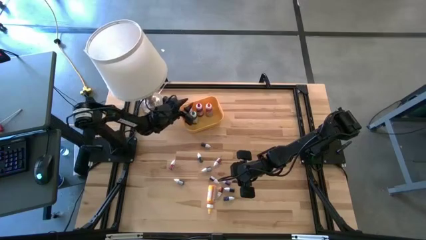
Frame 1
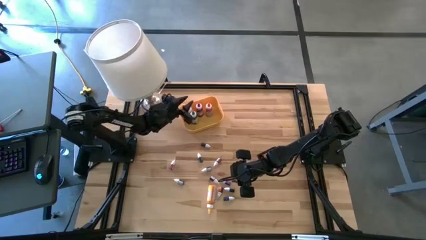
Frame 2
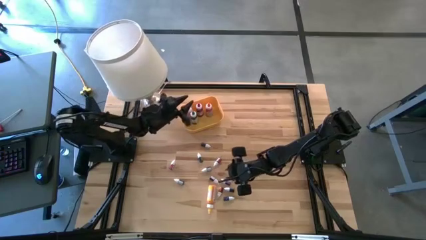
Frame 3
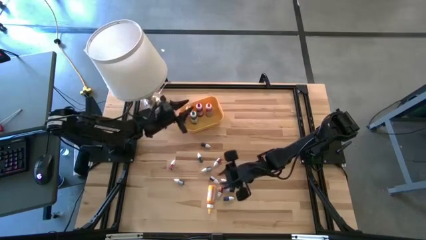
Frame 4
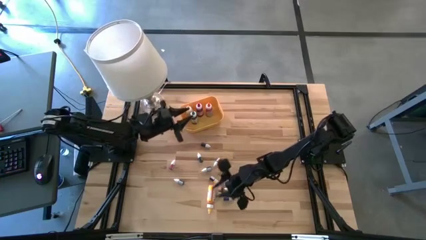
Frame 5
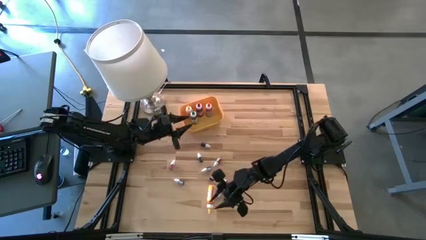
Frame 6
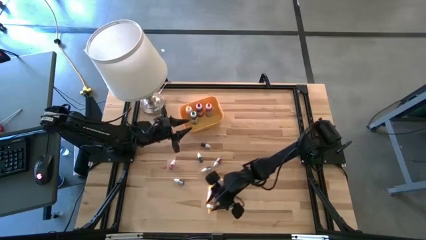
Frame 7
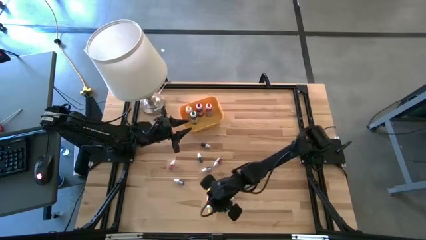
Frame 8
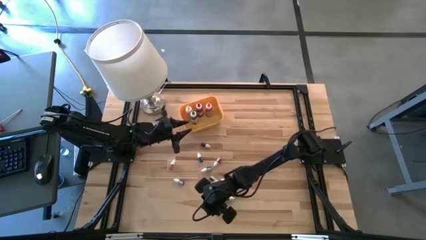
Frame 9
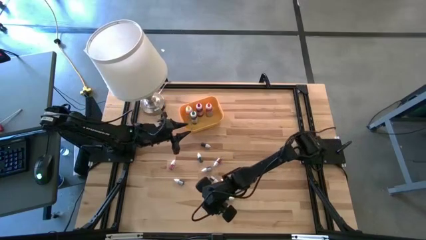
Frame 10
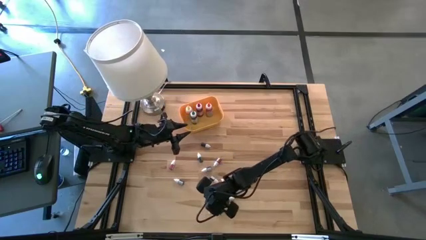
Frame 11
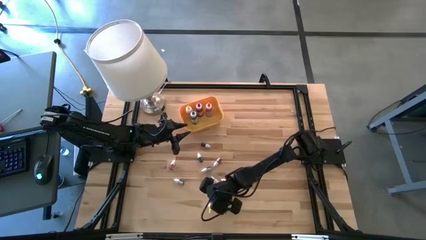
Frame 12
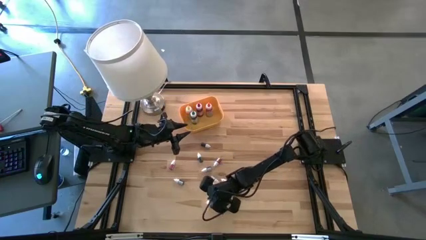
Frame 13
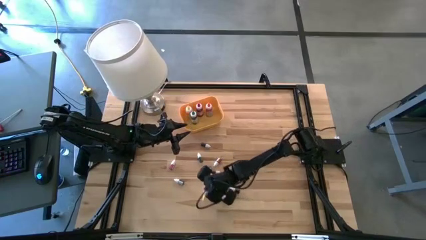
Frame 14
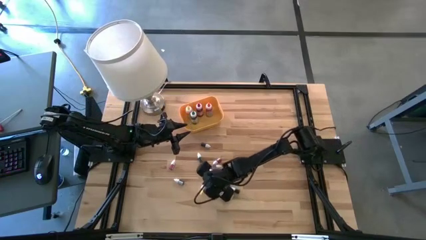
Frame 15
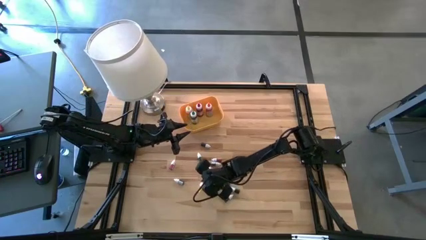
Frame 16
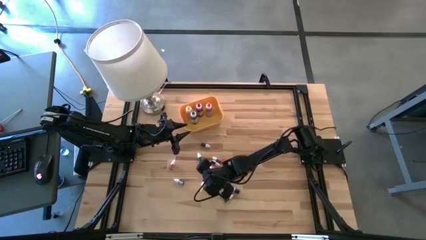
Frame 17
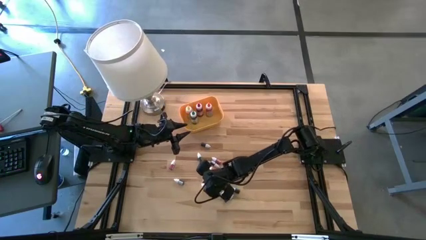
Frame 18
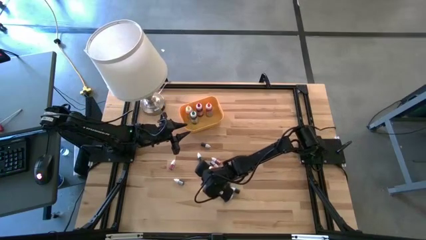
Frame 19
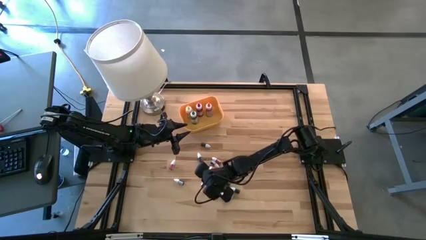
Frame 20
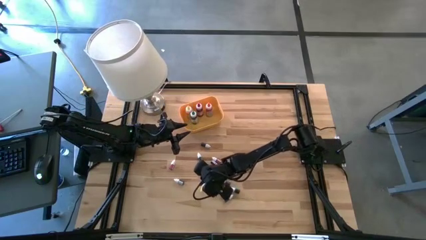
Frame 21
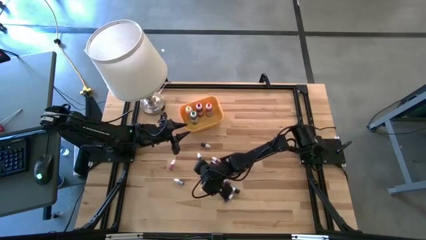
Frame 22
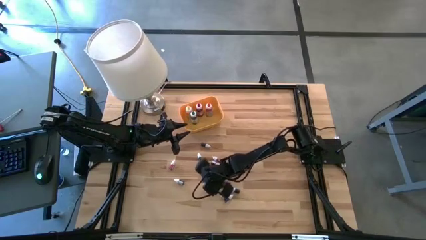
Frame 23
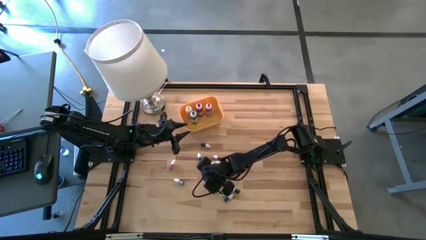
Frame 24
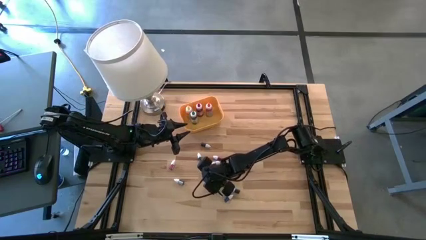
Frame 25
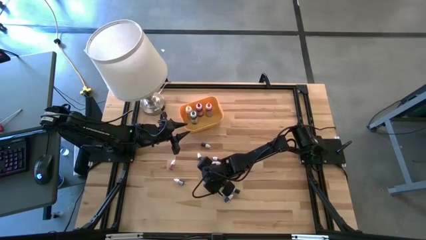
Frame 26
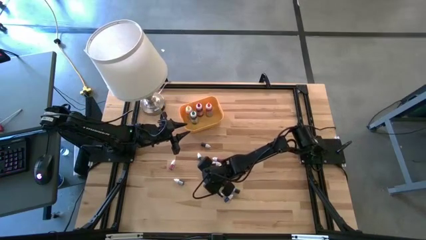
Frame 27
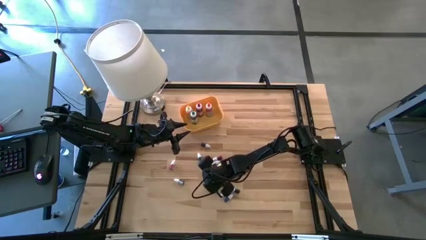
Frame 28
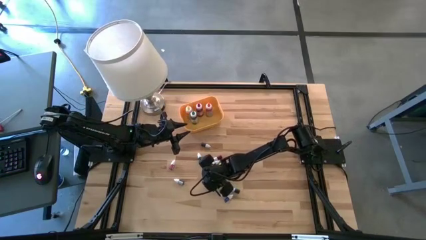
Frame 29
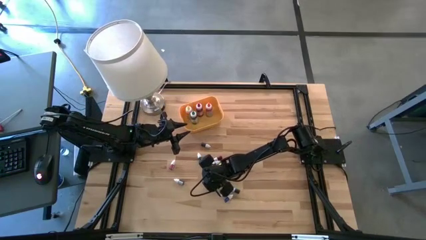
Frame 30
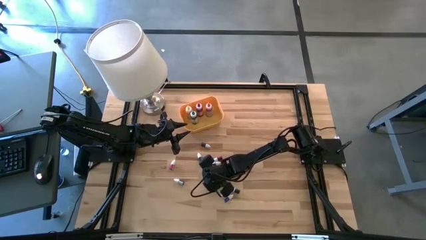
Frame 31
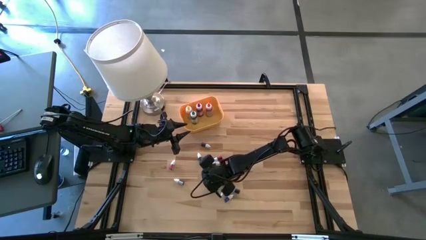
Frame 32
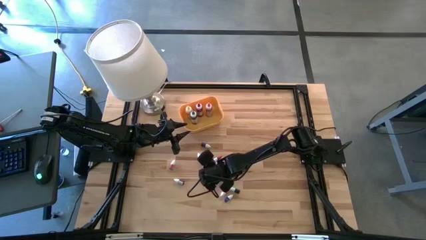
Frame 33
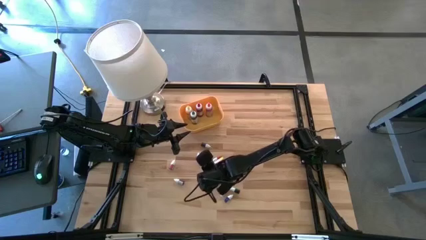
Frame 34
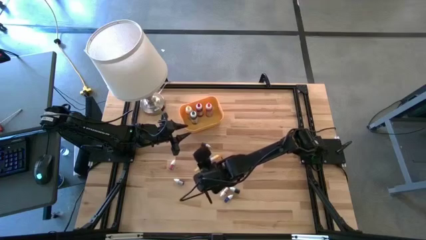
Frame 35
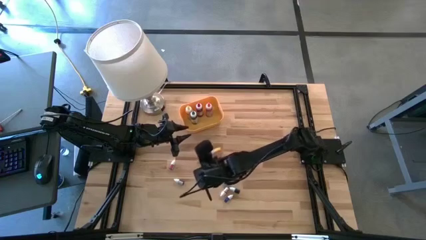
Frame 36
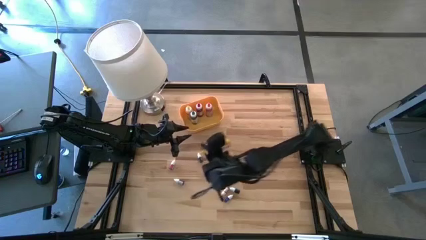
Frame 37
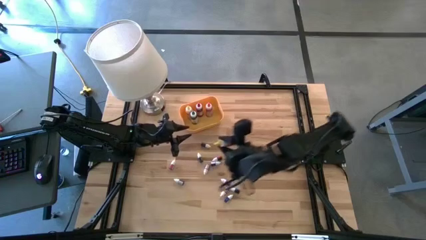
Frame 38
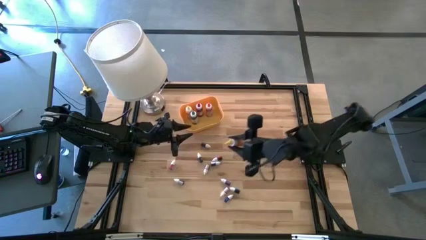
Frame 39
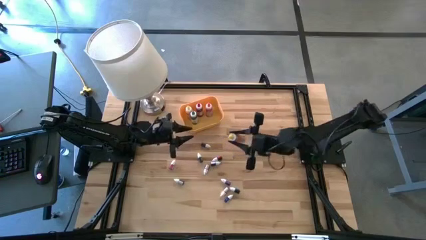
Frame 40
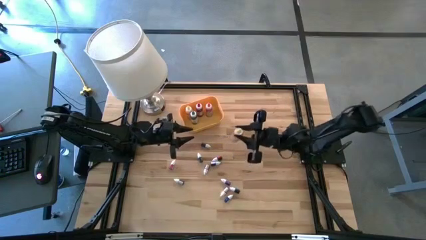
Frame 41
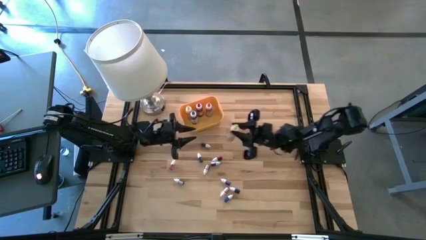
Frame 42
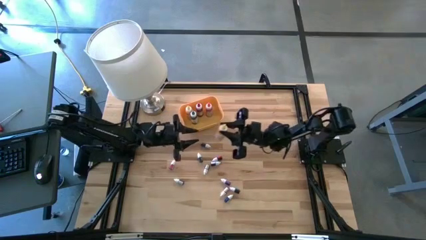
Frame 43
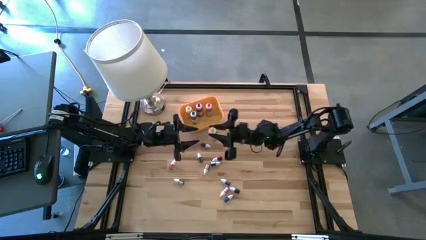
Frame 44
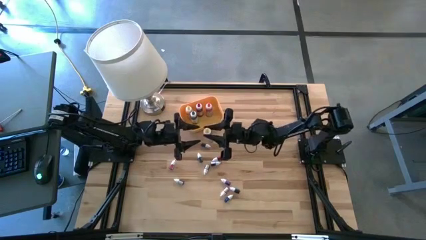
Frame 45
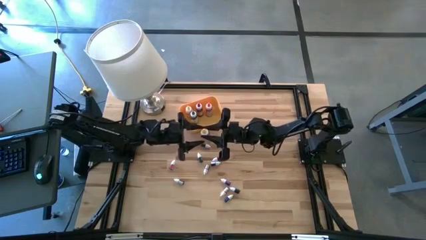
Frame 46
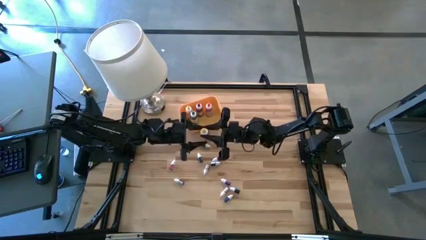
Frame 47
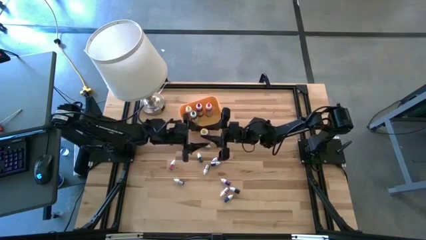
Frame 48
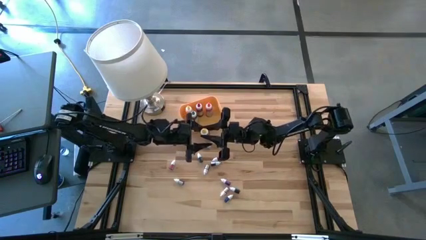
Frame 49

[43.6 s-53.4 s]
Task: Pick & Place food coloring
Put the large yellow food coloring bottle into the bin

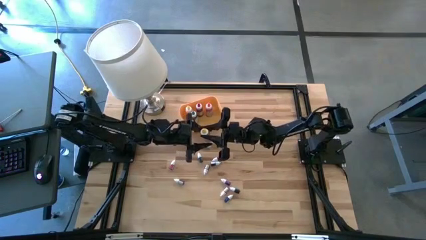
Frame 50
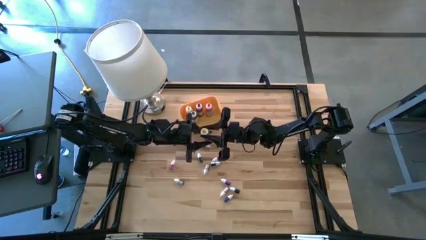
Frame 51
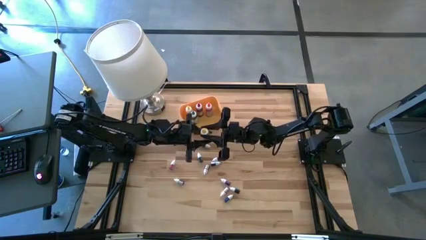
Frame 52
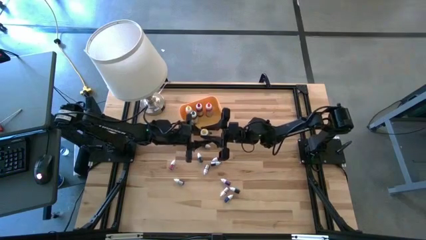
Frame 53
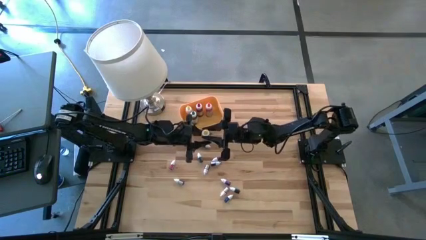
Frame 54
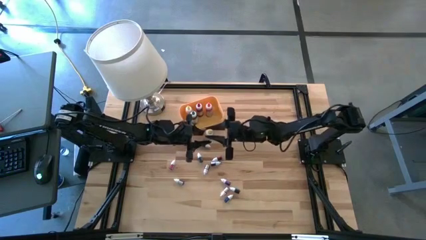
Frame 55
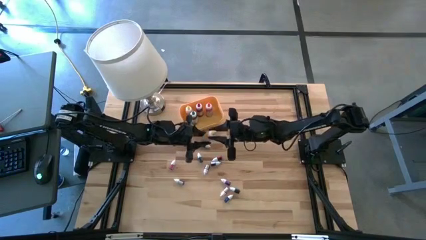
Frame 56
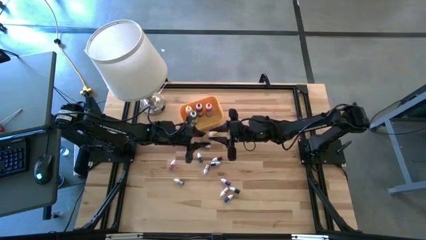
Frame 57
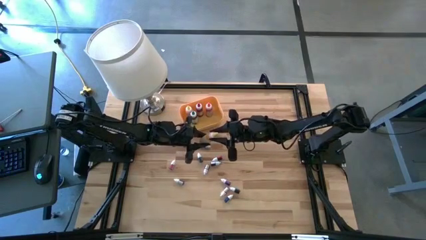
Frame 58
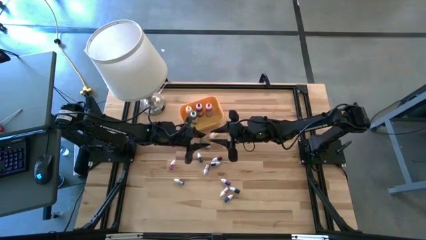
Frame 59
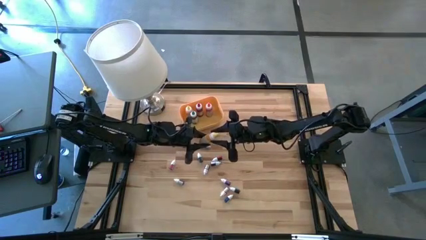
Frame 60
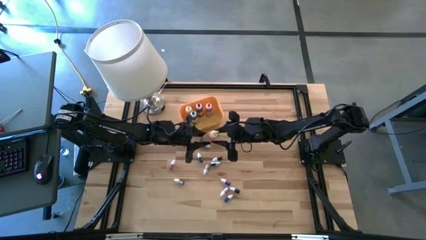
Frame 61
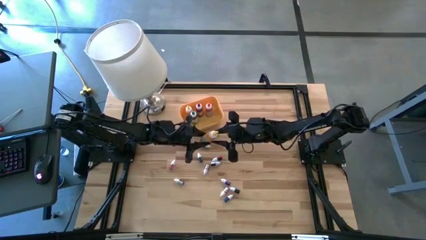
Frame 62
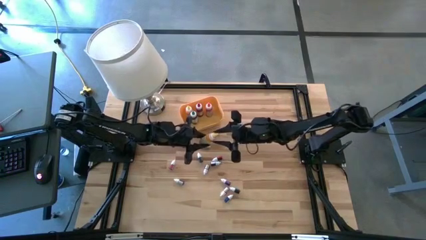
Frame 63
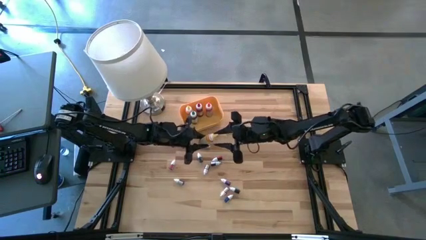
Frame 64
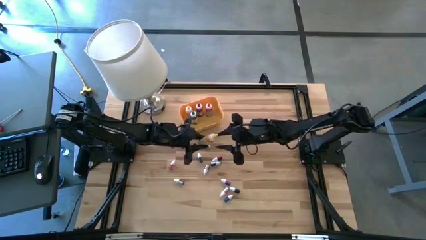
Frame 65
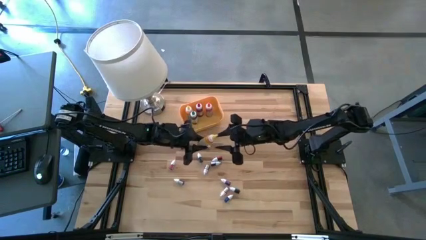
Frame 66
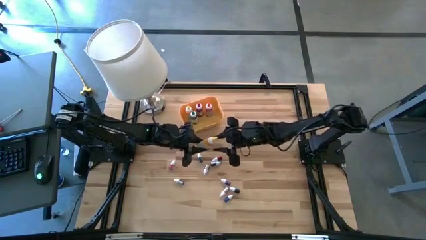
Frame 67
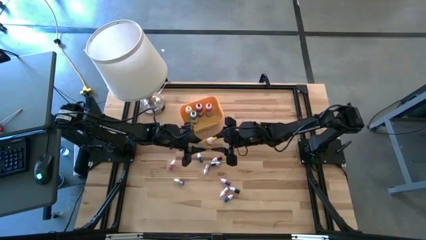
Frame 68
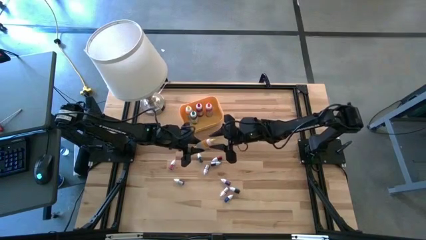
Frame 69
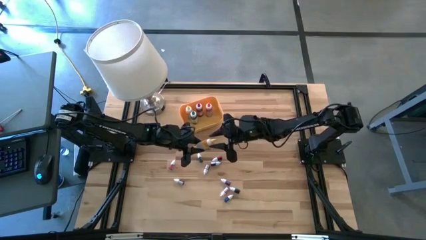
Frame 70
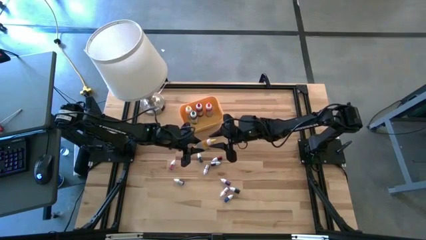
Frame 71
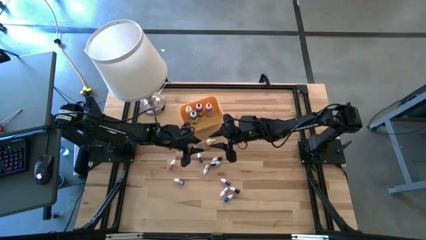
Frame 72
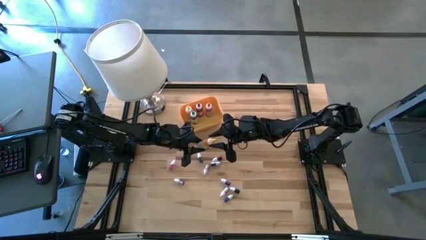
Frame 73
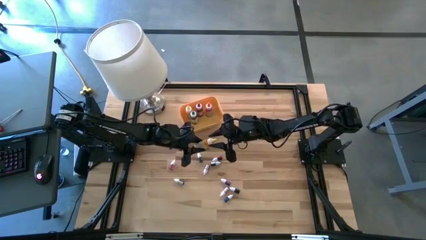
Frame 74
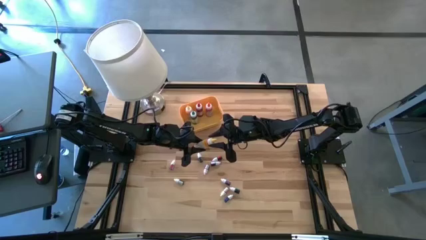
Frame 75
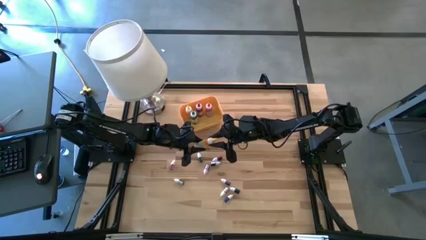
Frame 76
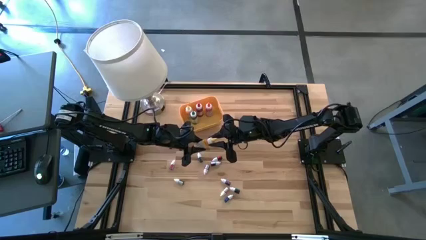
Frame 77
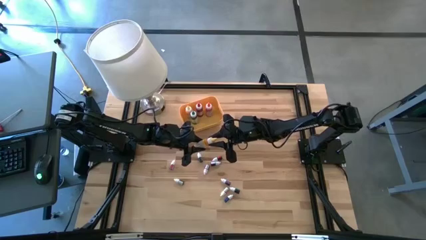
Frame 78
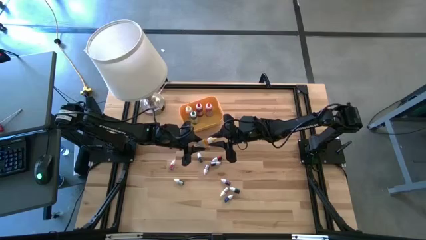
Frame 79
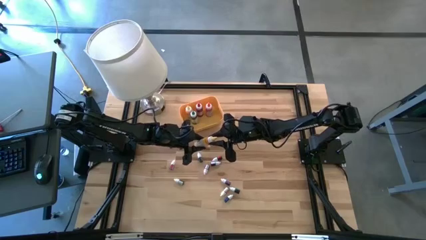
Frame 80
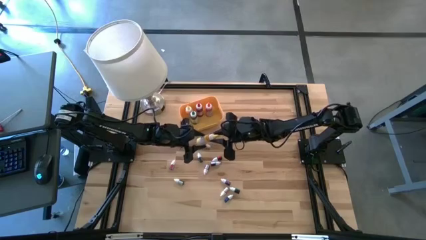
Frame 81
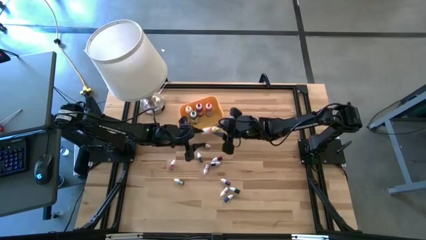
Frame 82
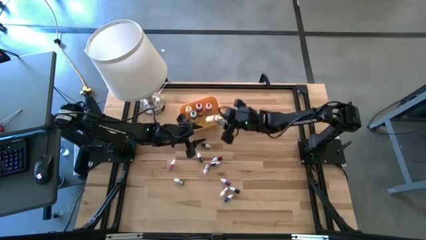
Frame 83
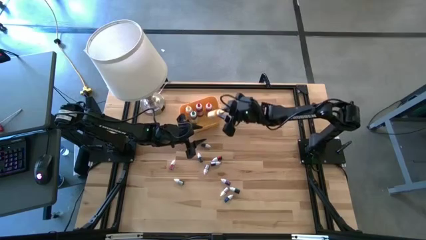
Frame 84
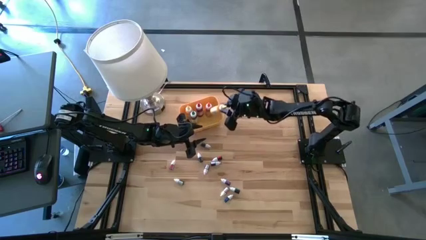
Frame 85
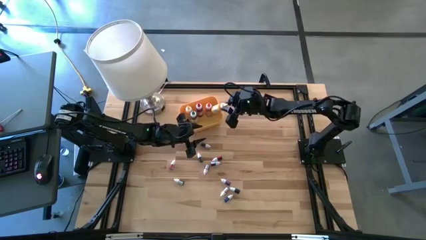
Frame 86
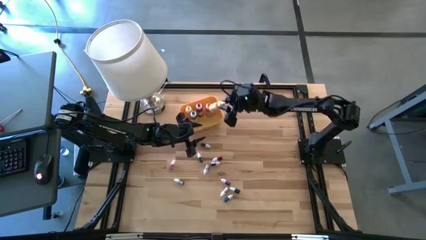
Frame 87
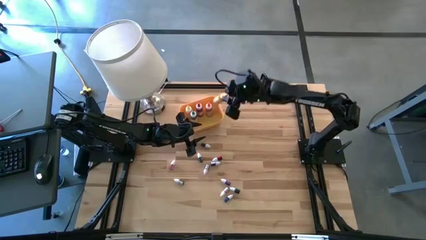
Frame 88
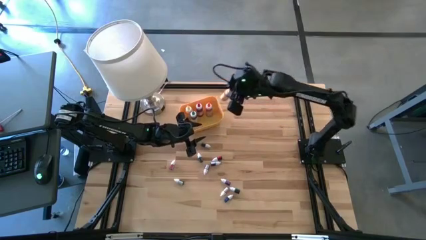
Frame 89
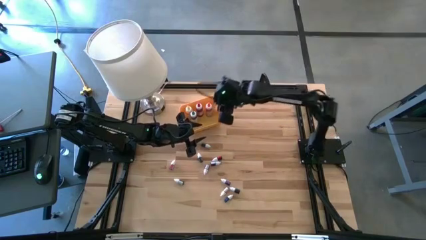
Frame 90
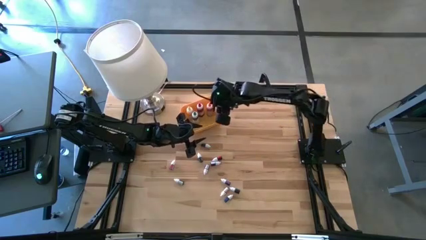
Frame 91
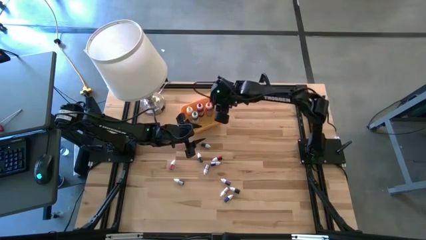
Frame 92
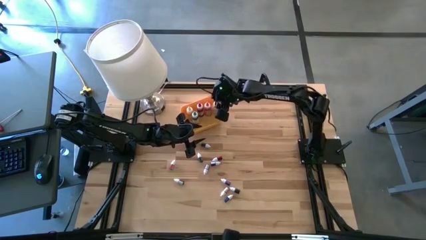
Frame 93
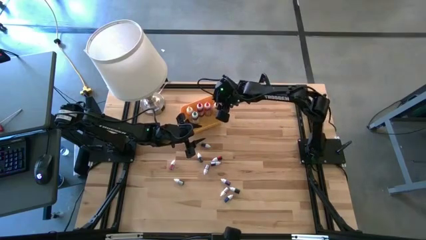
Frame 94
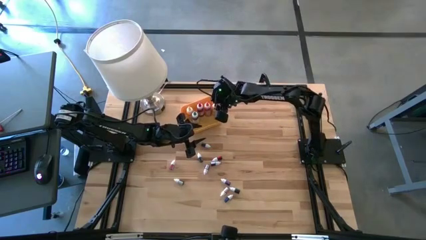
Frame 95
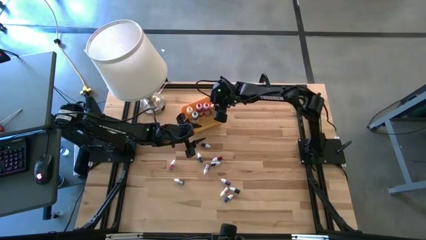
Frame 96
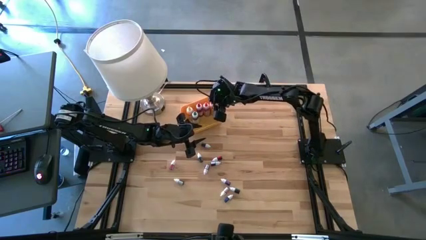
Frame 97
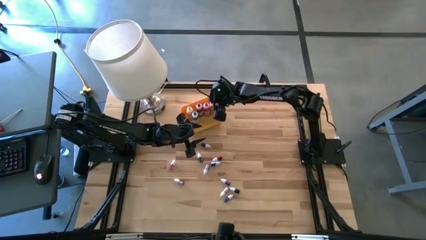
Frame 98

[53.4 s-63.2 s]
Put the large yellow food coloring bottle into the bin
